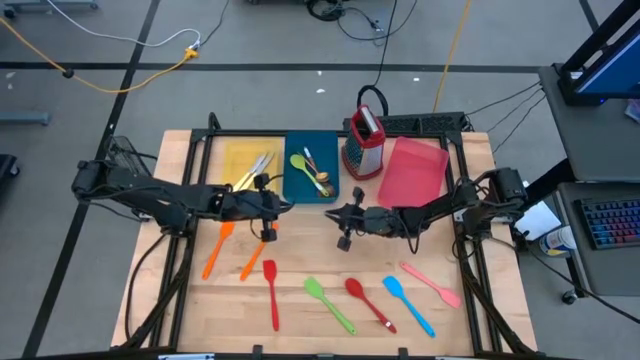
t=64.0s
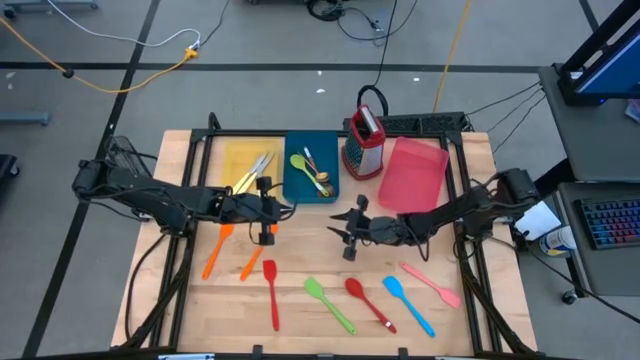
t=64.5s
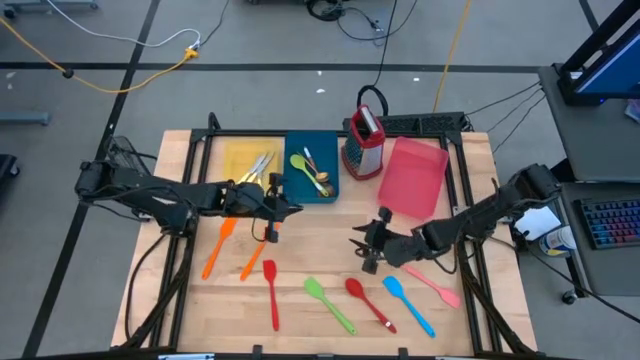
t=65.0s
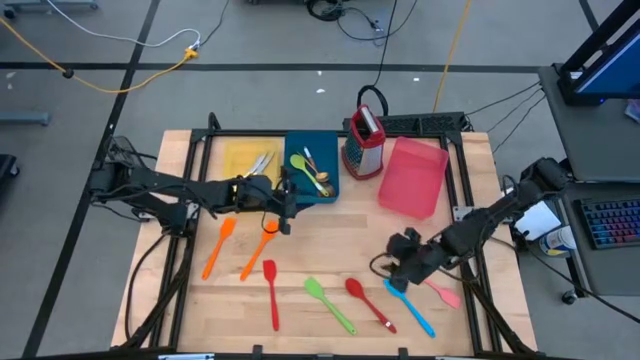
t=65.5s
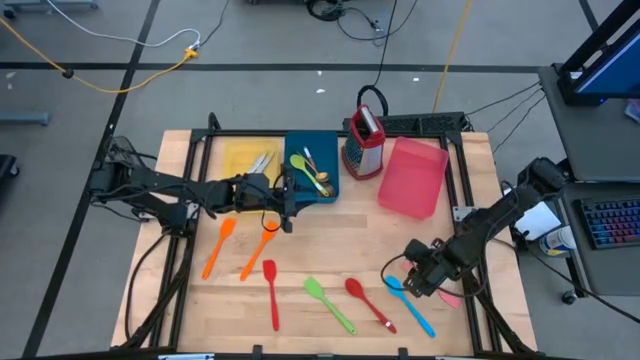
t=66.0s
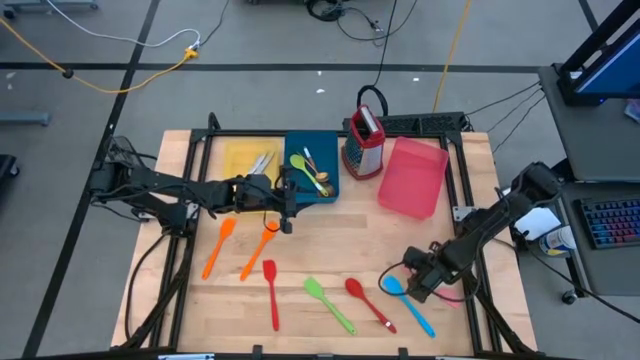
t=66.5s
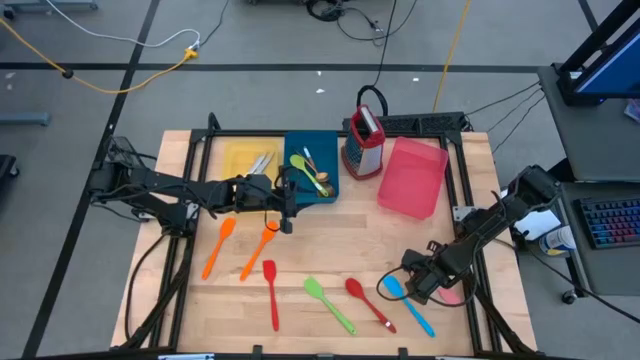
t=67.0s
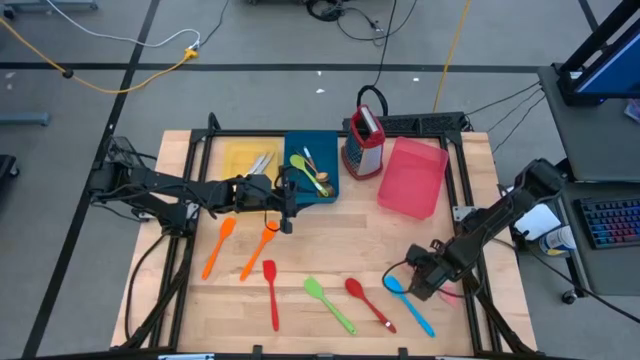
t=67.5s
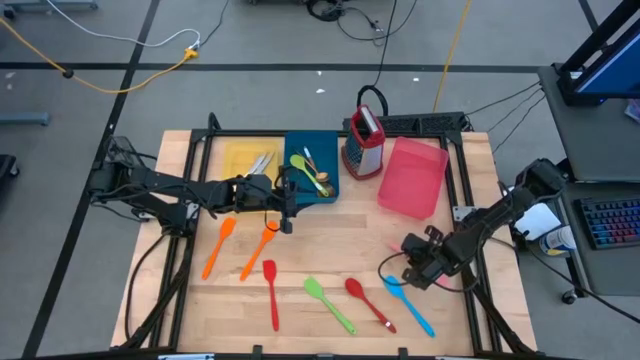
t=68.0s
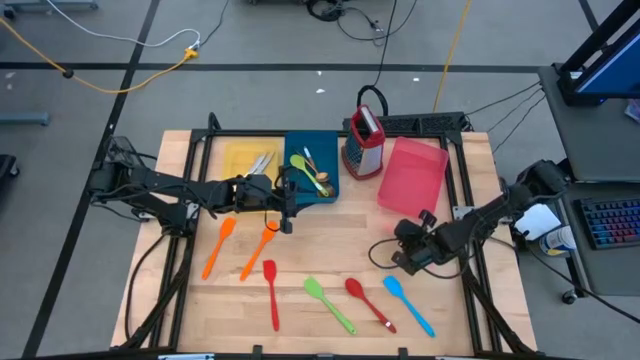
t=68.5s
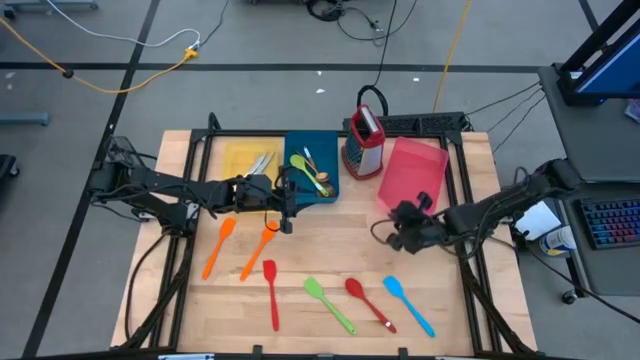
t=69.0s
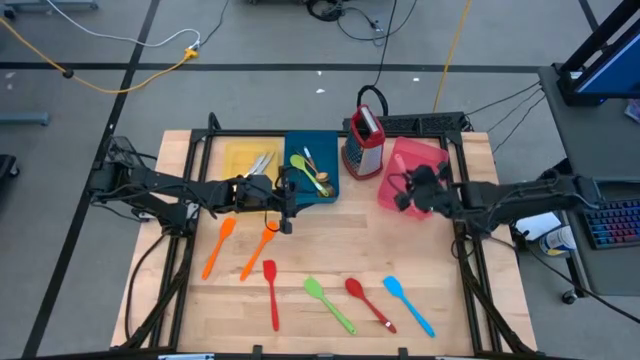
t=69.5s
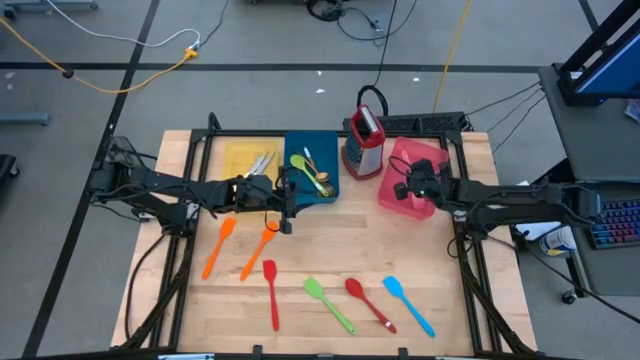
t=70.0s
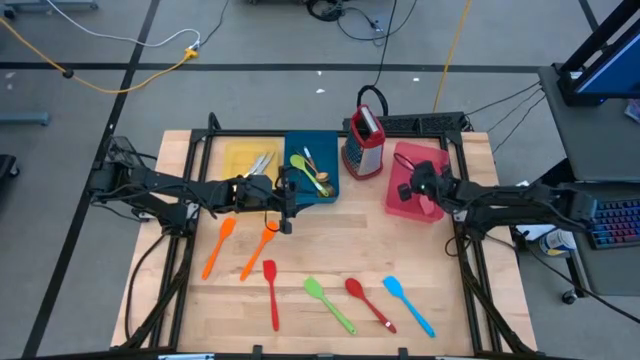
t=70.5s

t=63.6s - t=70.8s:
Task: Pick & Place Kitchen Items
Put the pink spatula into the pink bin

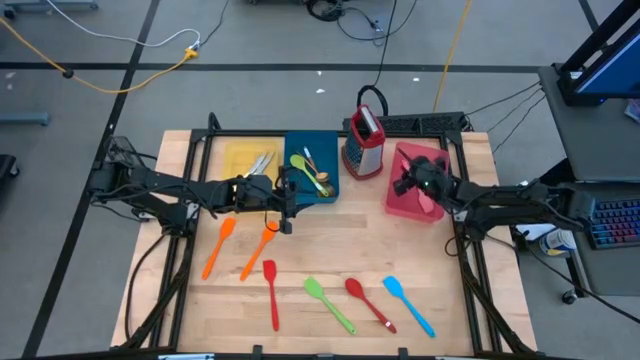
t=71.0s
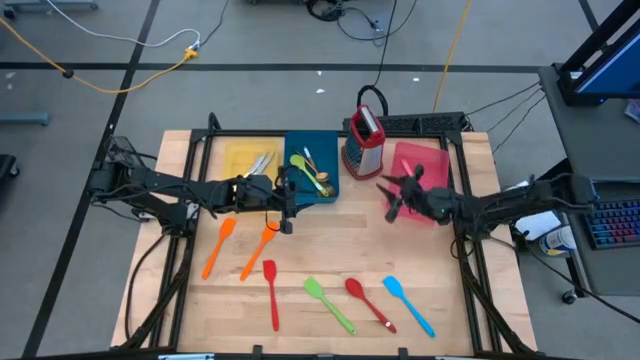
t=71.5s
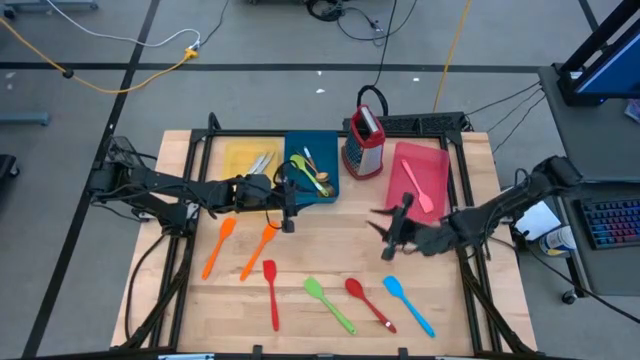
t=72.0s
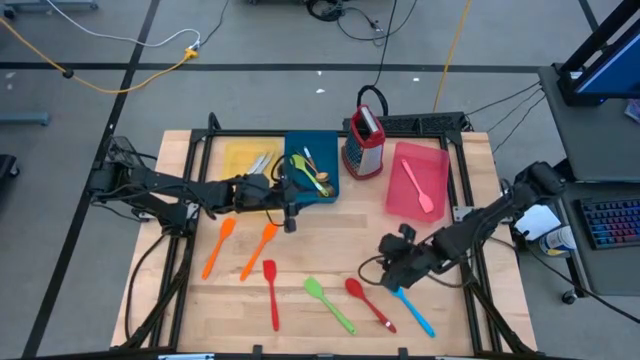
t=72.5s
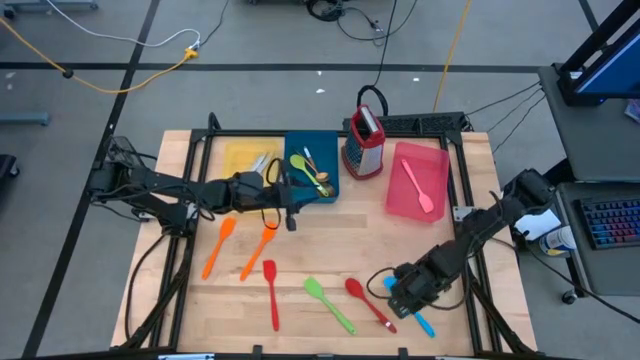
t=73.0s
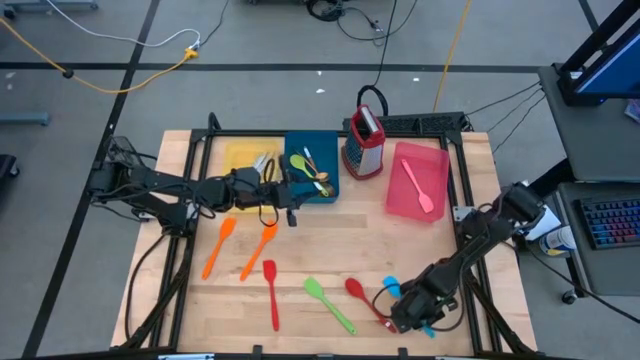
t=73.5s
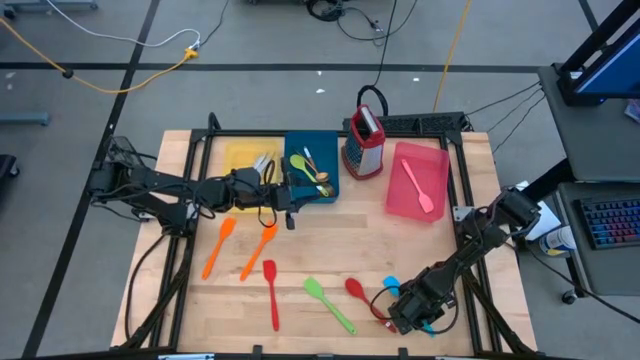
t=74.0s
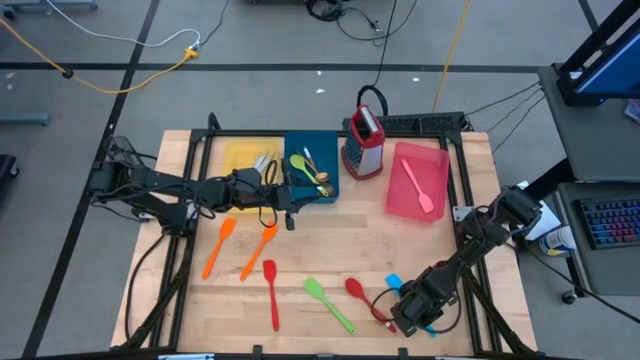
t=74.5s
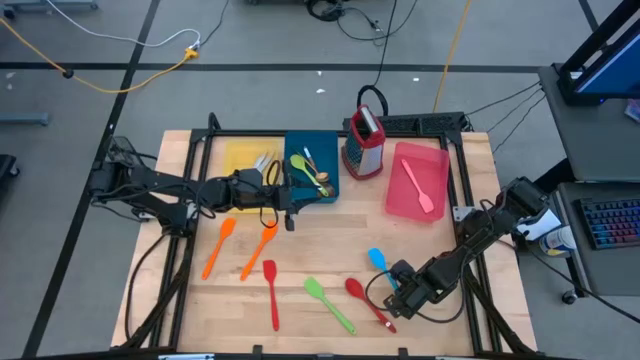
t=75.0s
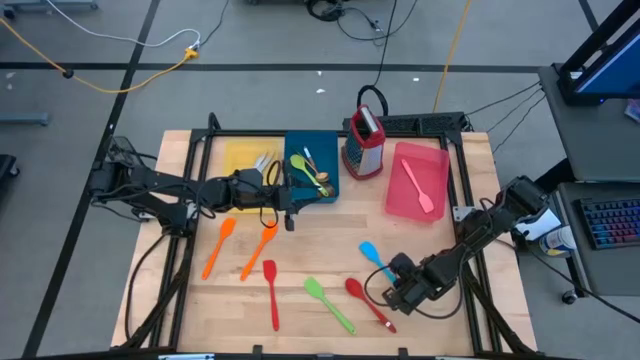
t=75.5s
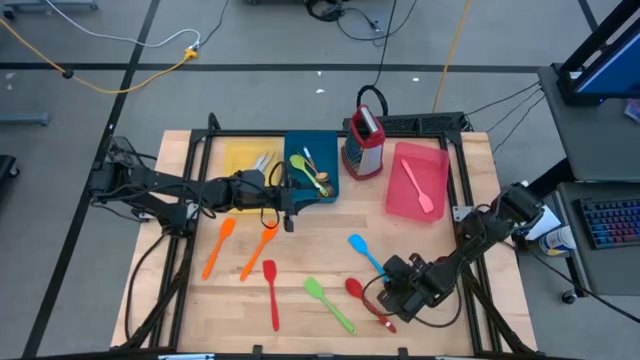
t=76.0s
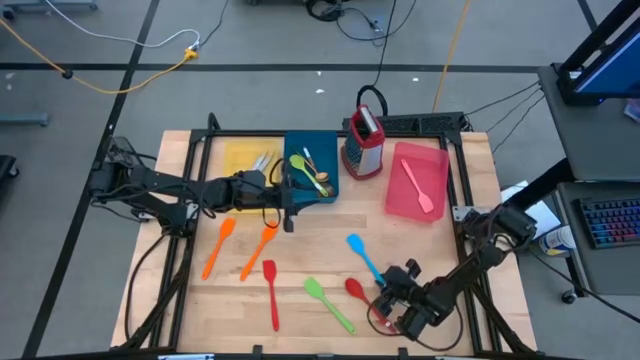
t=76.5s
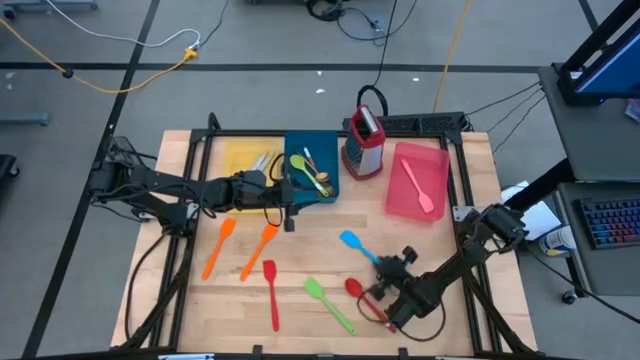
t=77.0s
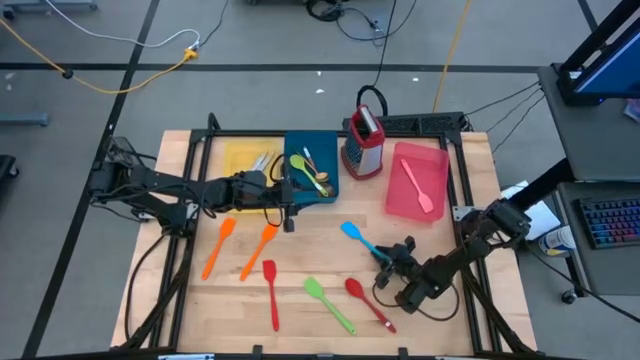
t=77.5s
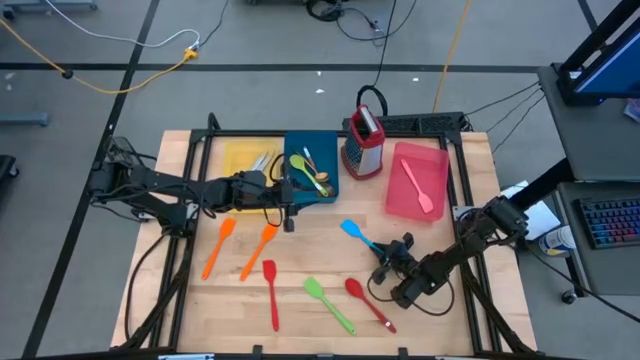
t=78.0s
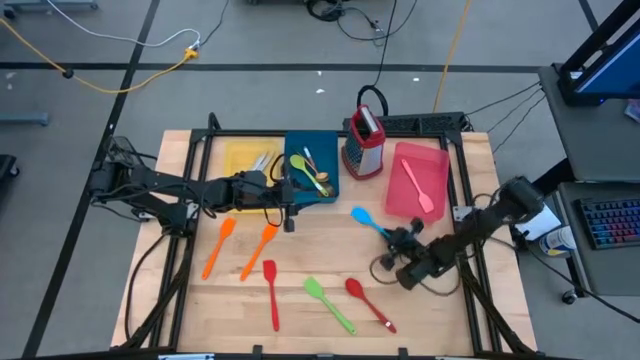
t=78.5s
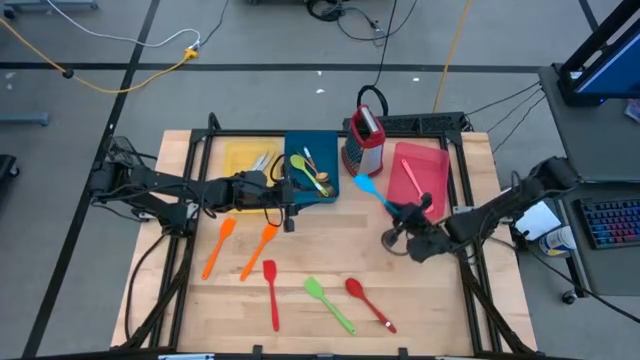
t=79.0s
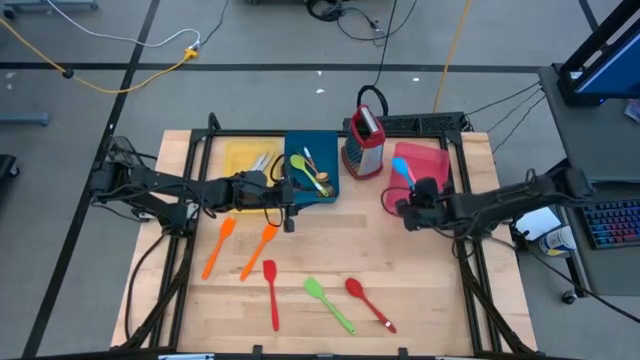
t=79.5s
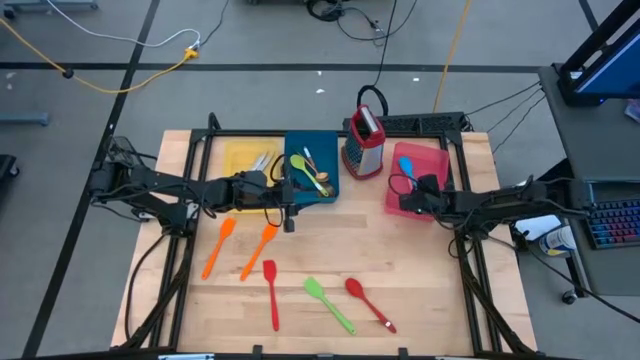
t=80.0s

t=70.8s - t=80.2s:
Put the blue spatula into the pink bin

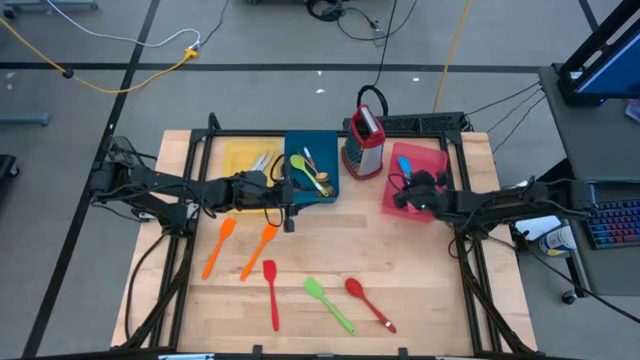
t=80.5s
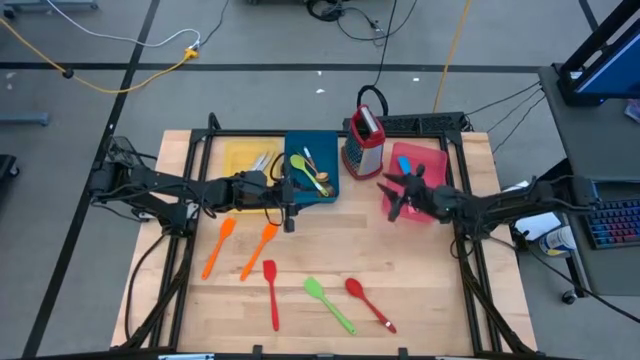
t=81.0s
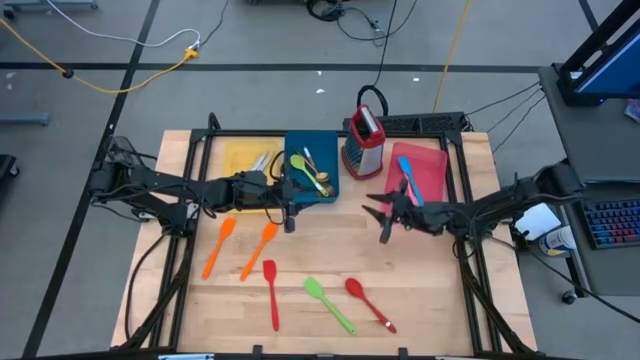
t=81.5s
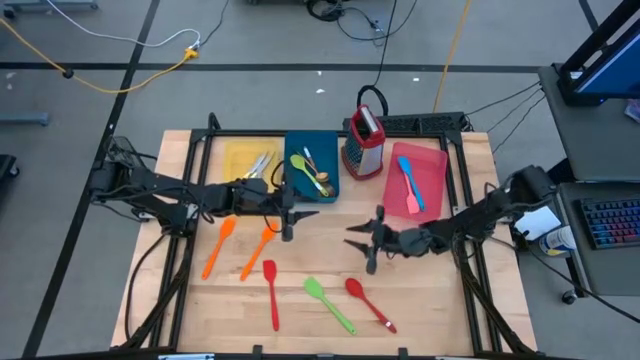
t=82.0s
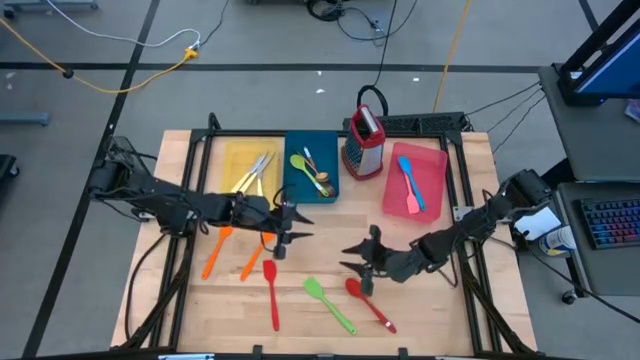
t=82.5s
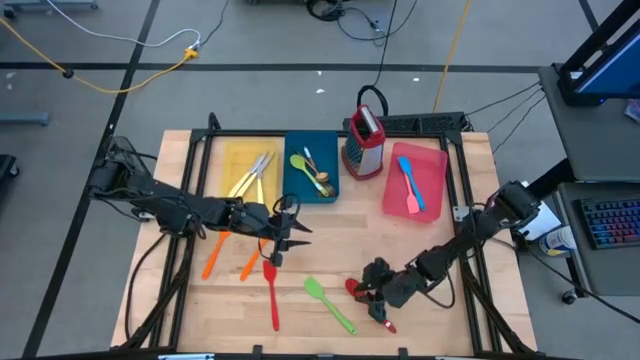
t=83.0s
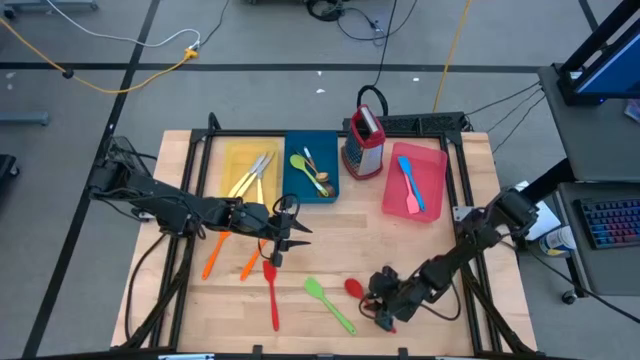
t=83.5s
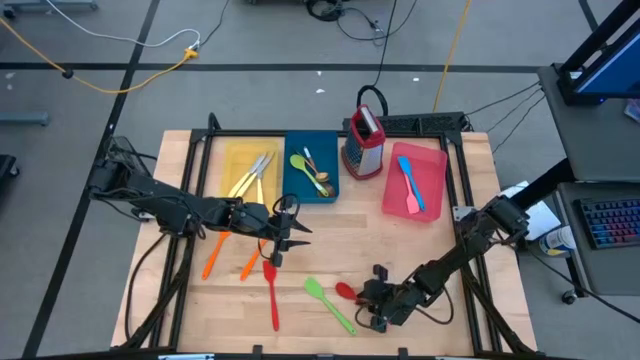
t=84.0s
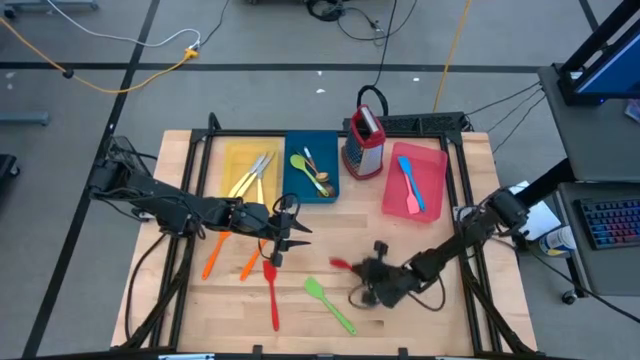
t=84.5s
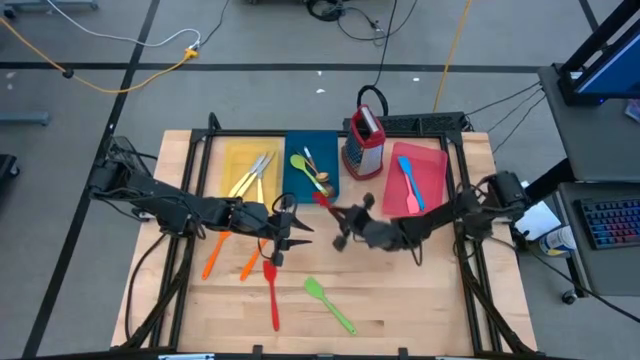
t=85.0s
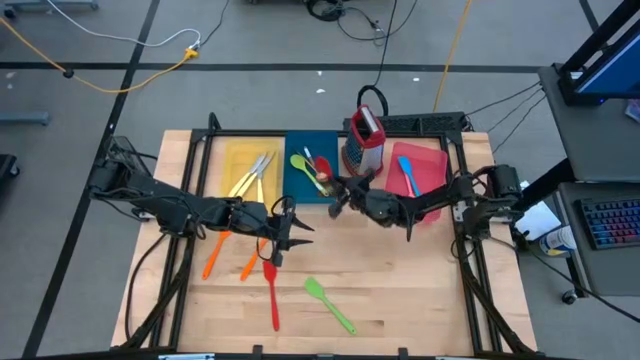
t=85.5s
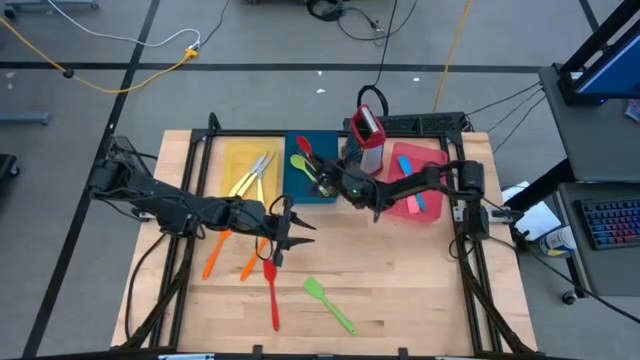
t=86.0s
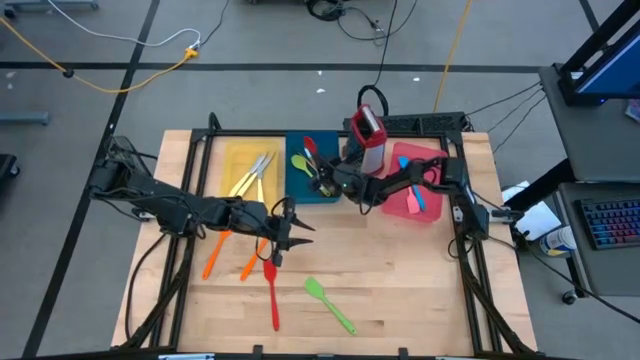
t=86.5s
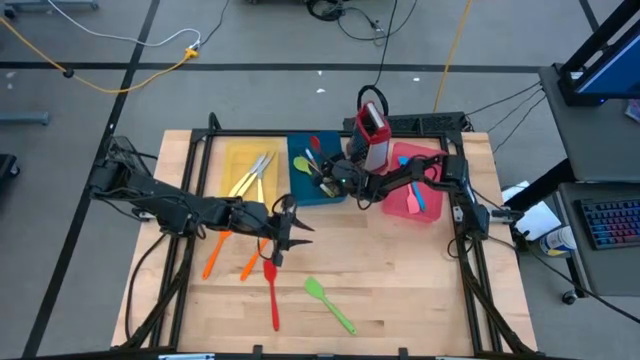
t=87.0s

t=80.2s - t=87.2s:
Put the right red serving spoon into the blue bin
